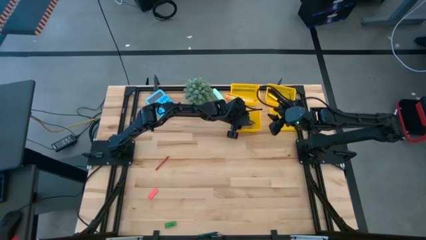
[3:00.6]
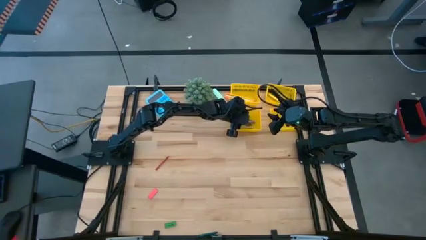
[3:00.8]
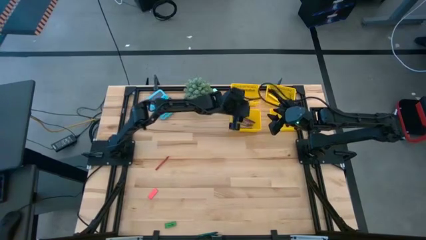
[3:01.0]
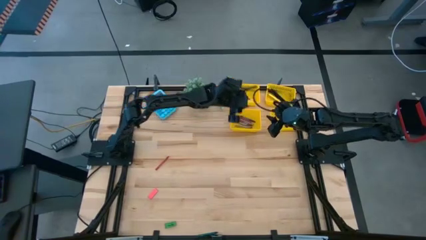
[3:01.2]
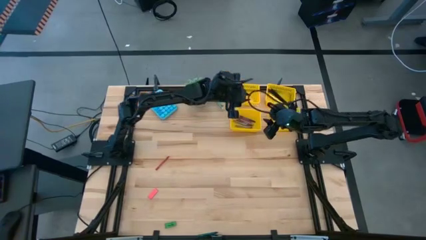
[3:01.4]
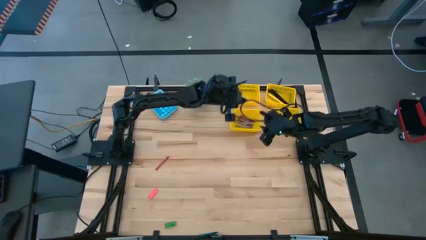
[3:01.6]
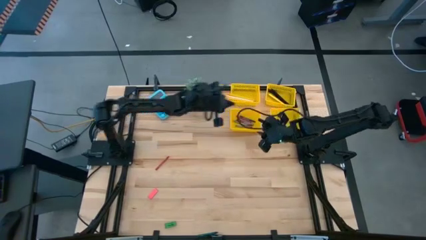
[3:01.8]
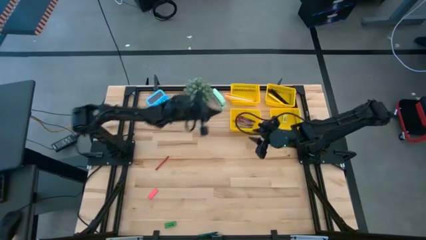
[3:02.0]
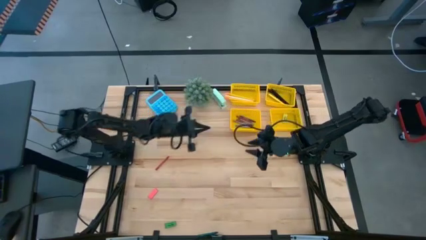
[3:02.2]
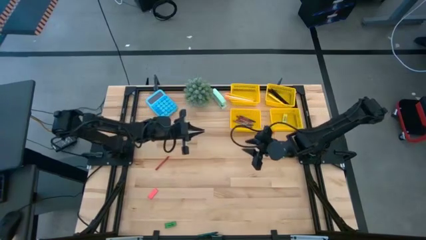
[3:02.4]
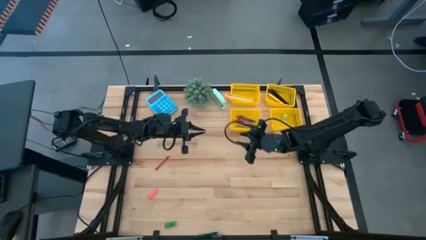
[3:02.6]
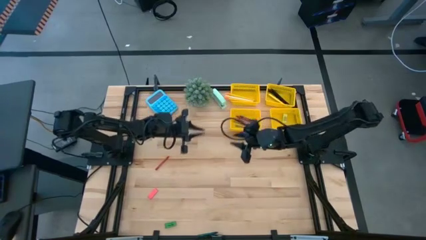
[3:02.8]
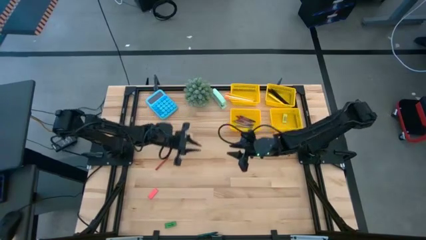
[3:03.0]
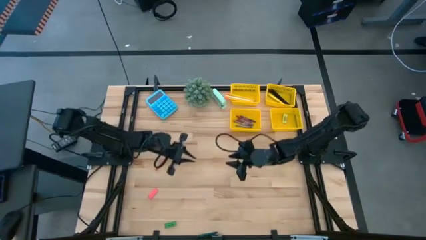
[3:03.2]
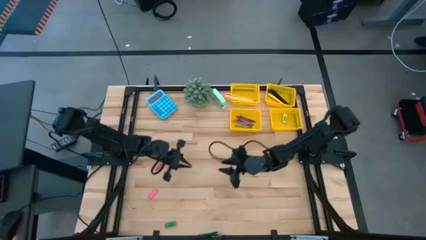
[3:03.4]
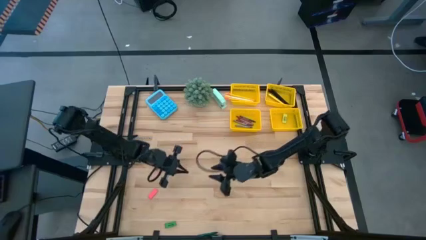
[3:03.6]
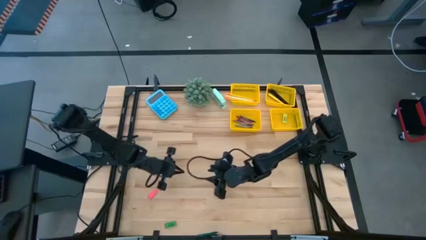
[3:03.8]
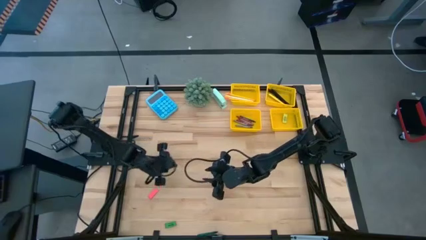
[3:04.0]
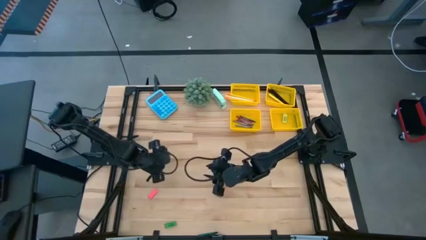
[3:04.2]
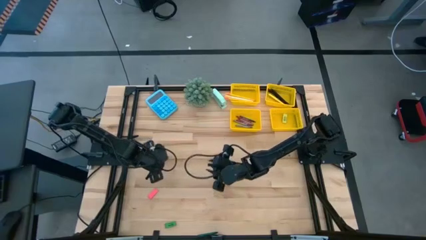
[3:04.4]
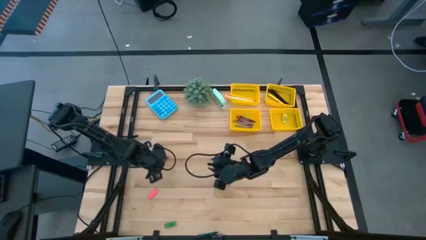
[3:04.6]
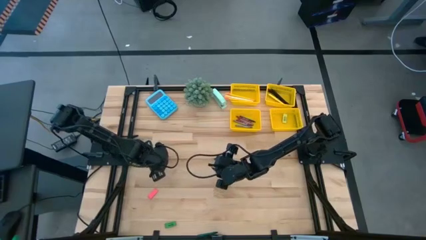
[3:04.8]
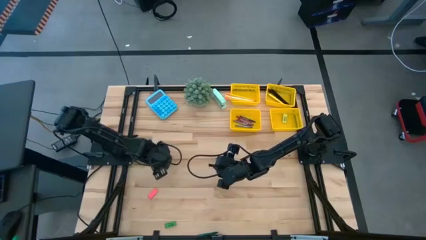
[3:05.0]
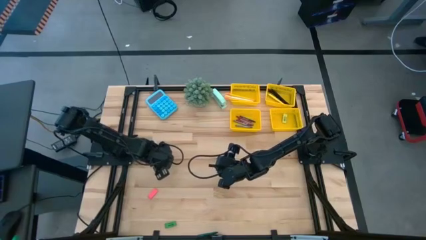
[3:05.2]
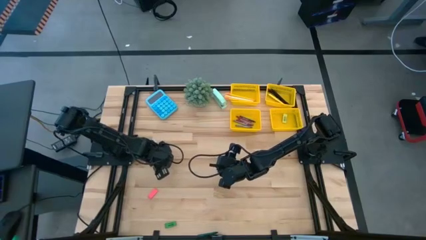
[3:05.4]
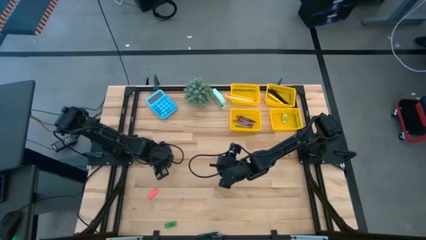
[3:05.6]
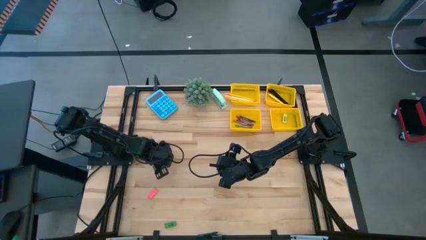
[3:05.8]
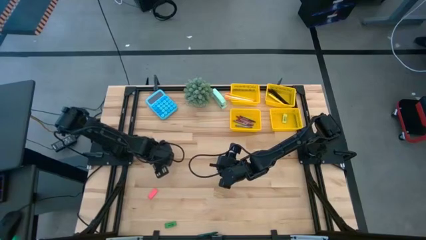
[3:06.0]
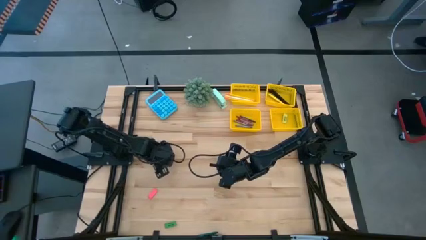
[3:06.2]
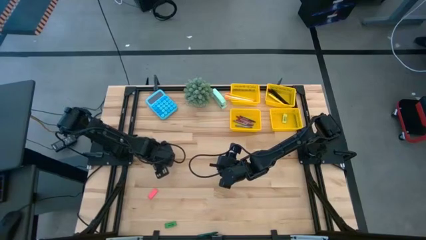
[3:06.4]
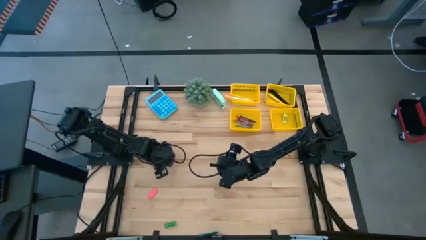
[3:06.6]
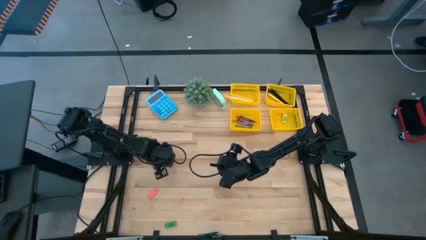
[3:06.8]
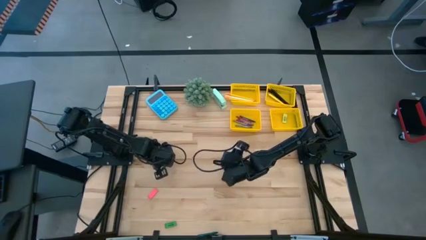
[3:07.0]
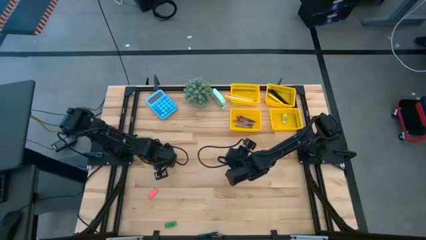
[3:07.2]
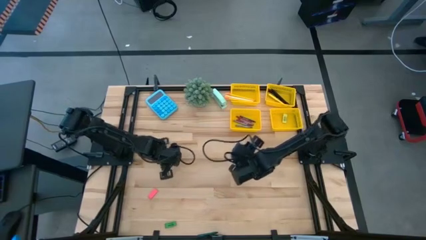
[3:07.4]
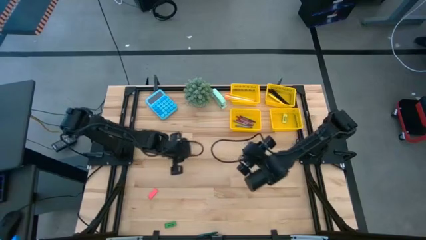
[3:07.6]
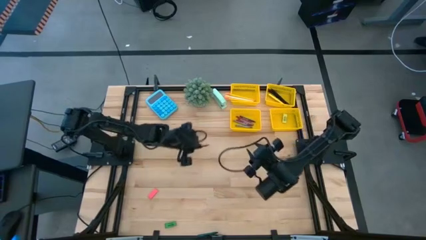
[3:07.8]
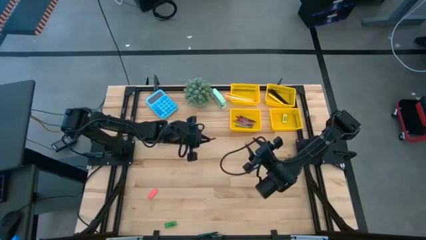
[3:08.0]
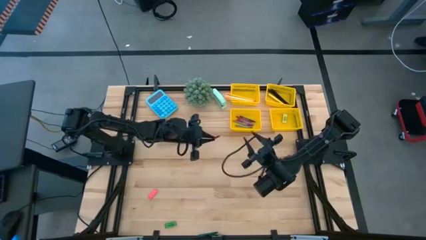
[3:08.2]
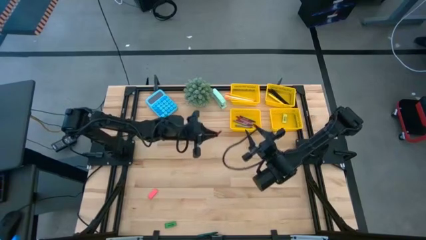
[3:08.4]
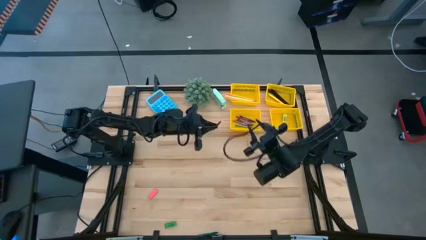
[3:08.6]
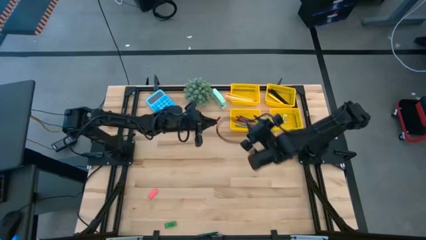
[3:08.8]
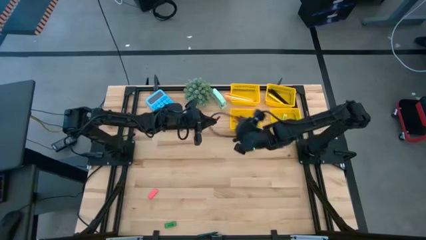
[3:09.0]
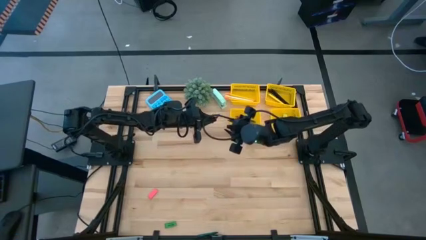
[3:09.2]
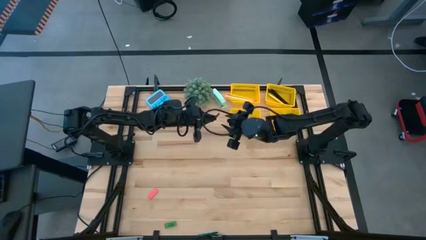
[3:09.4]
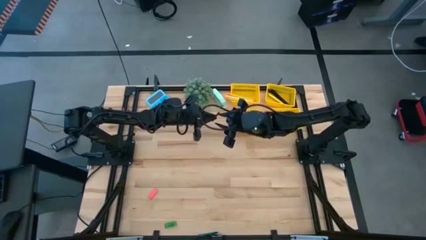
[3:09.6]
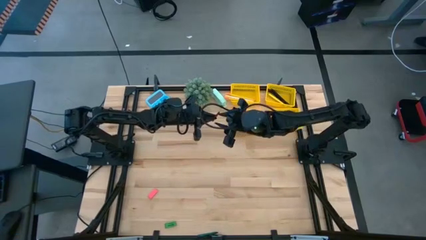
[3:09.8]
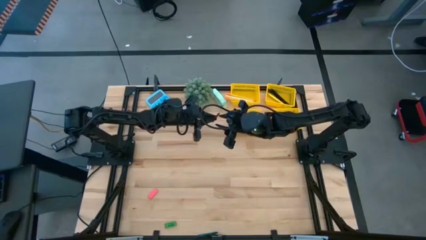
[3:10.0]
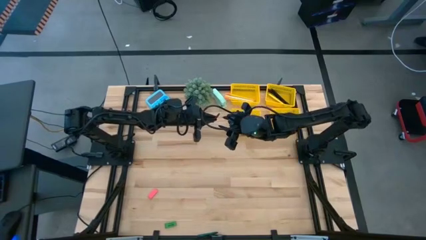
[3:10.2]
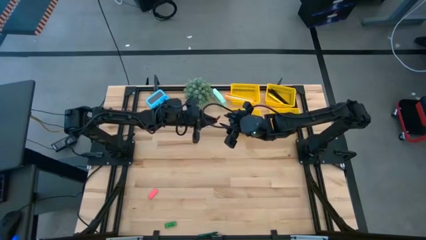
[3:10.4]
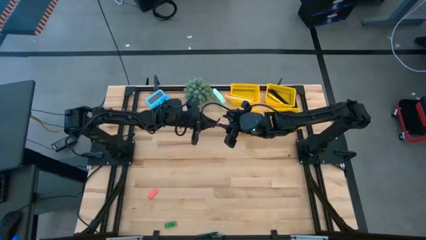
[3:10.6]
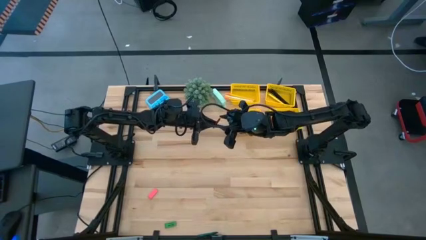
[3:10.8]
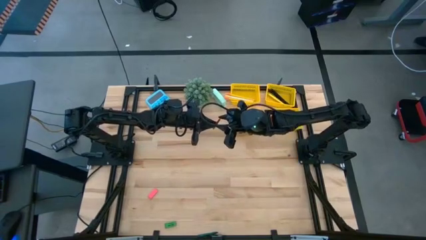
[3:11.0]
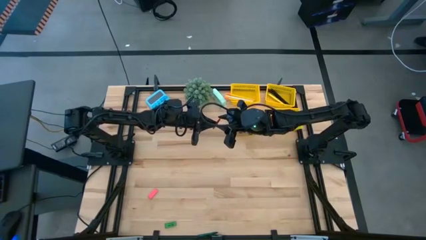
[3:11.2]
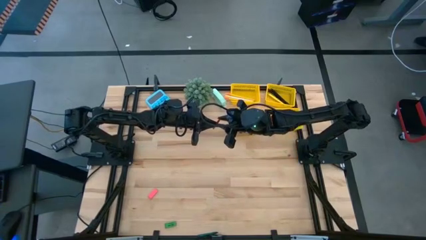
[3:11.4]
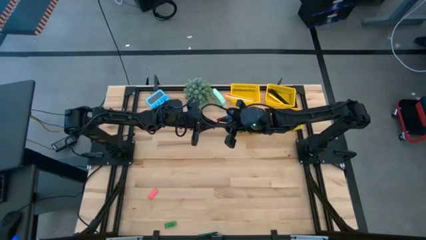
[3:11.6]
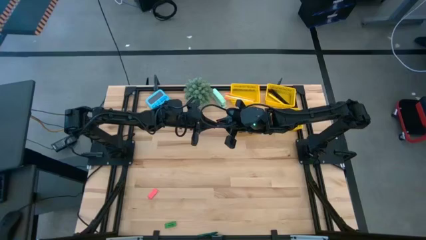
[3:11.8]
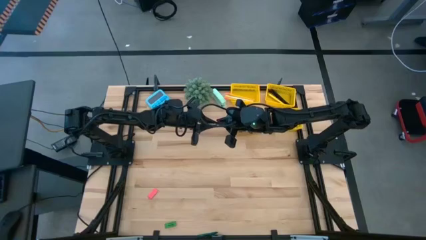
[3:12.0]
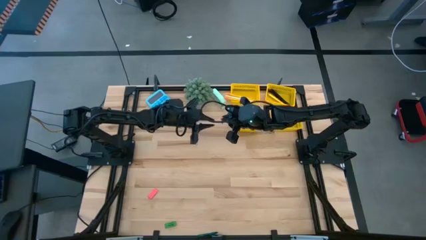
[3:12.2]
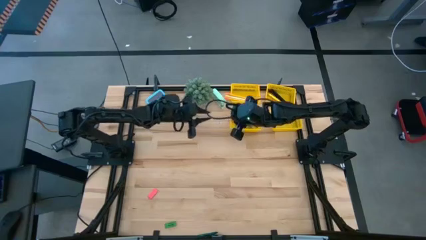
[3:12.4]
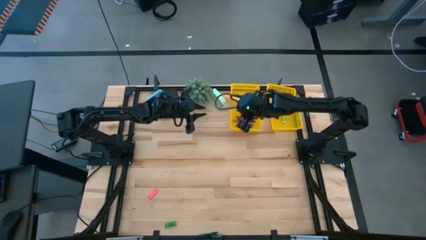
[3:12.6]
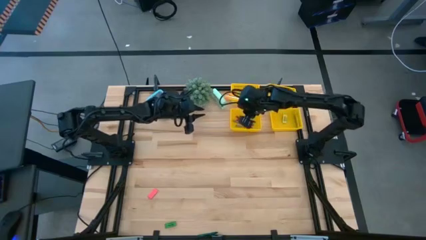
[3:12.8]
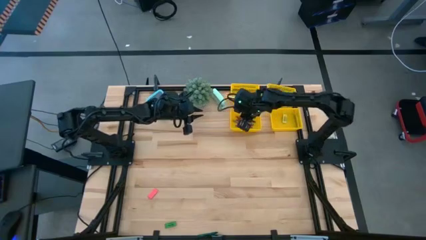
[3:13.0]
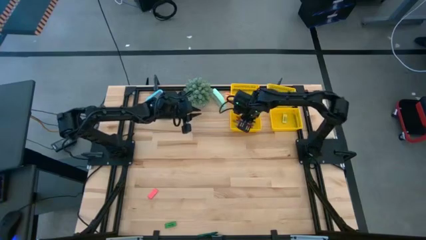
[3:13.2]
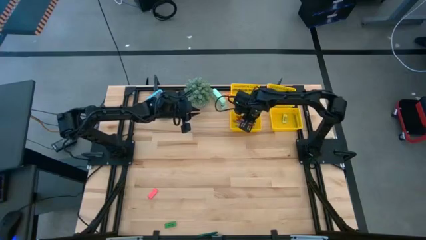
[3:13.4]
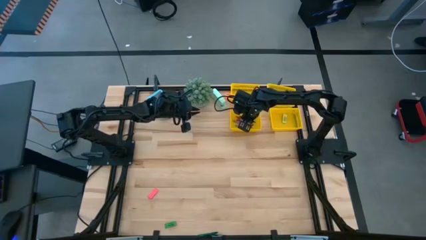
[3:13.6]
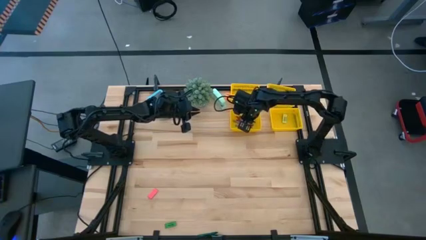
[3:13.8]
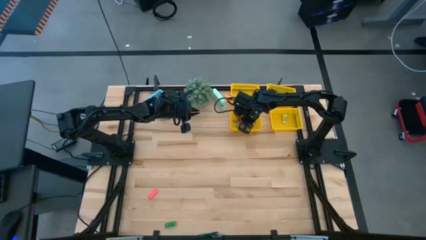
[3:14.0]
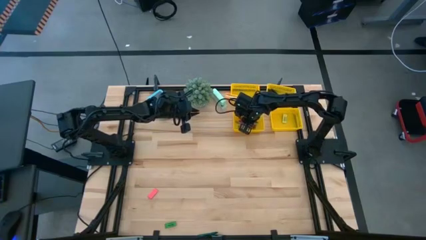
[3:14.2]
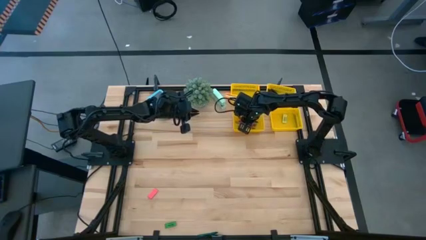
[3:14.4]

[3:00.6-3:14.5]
Task: Sort crayons/erasers/pens/pencils in bins
Put the red crayon into the bottom left yellow bin
